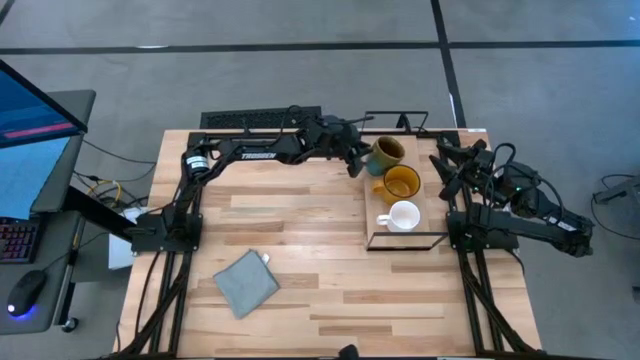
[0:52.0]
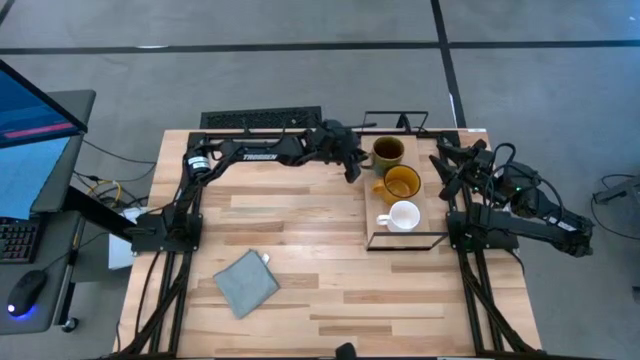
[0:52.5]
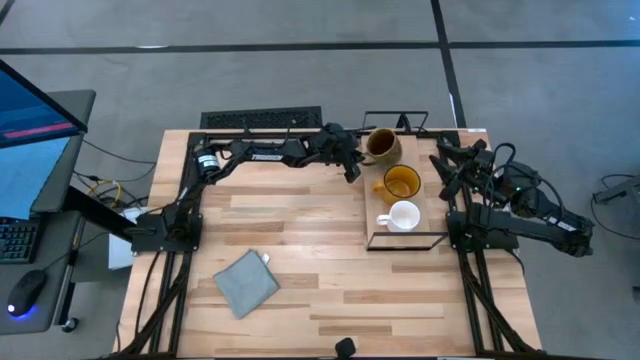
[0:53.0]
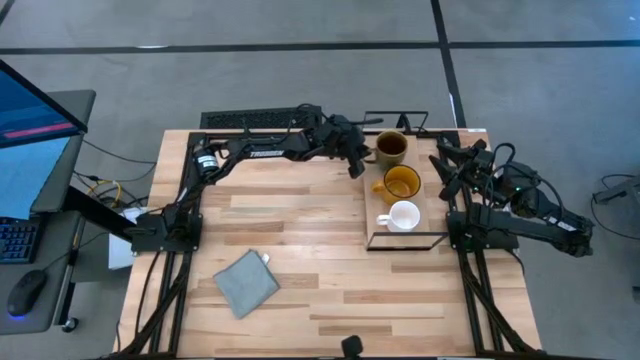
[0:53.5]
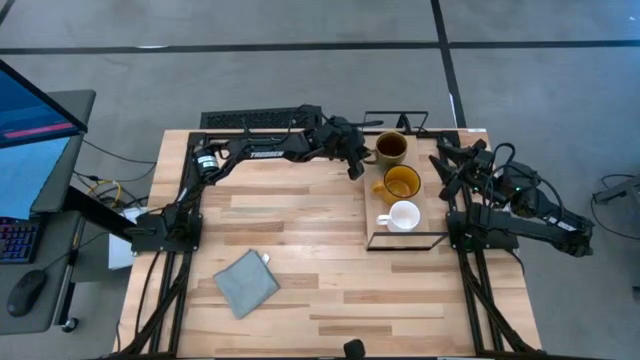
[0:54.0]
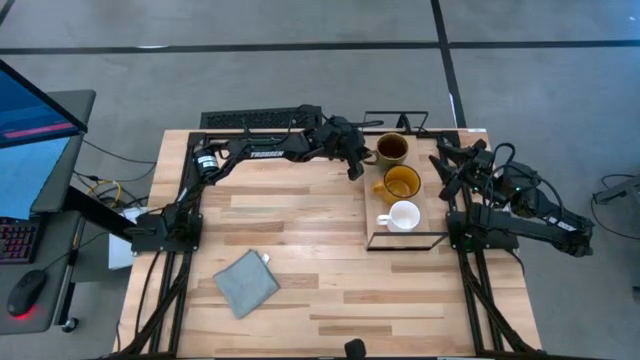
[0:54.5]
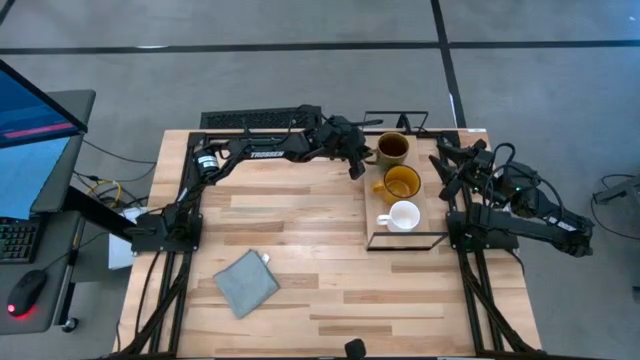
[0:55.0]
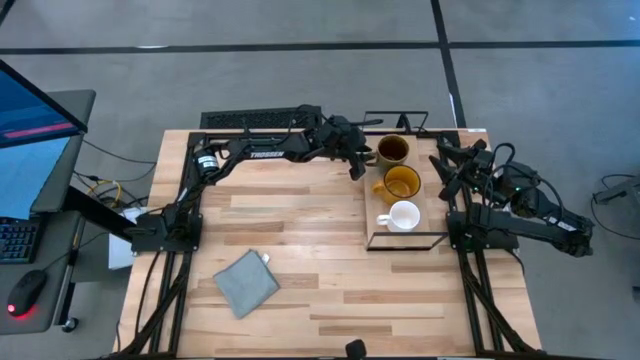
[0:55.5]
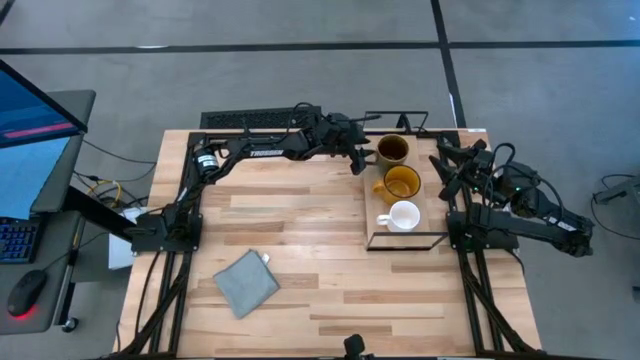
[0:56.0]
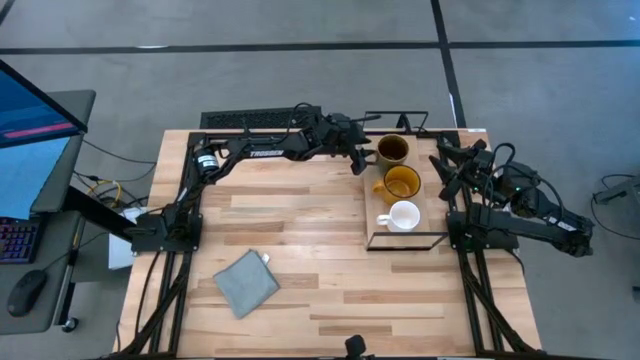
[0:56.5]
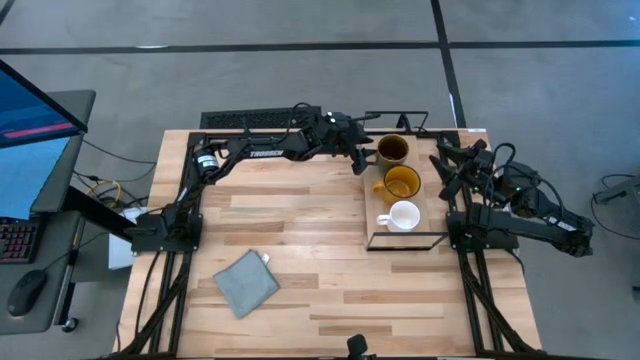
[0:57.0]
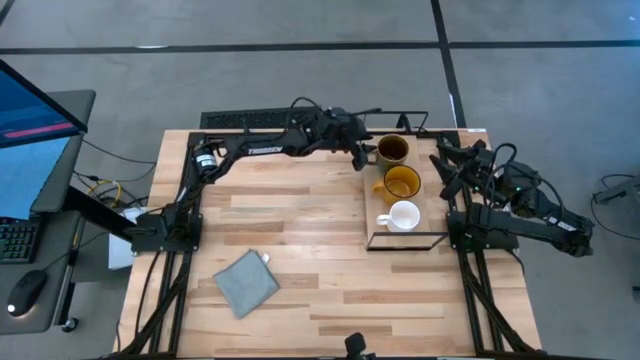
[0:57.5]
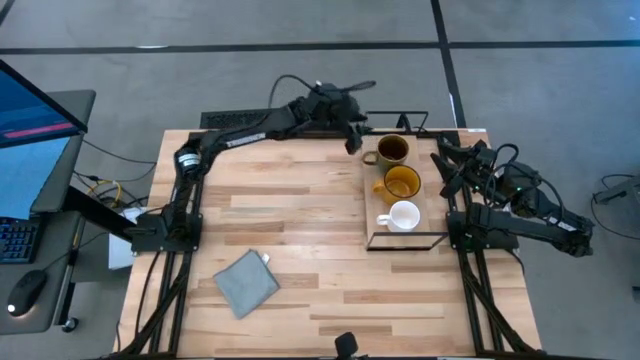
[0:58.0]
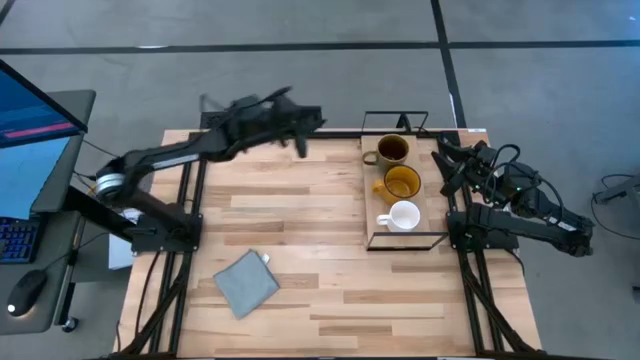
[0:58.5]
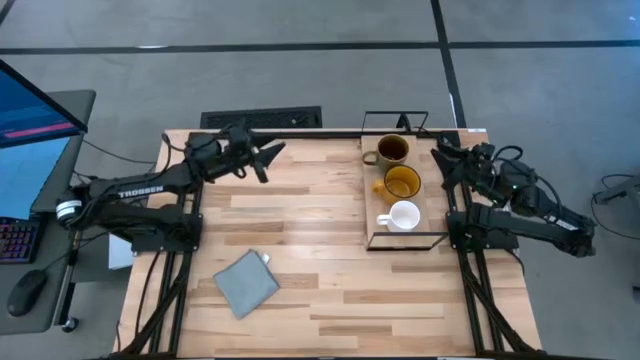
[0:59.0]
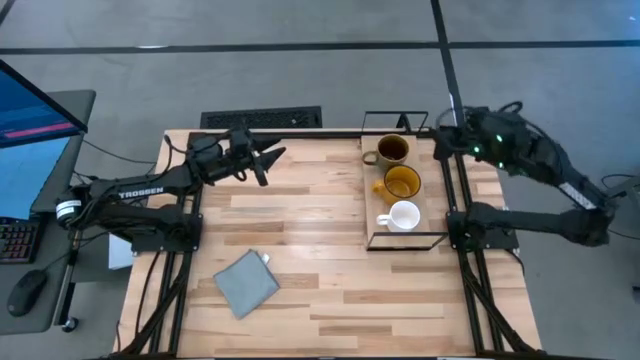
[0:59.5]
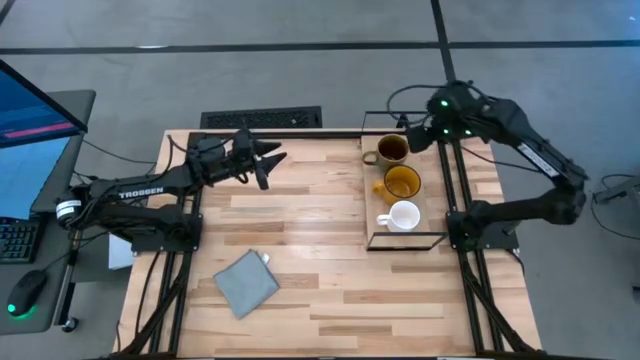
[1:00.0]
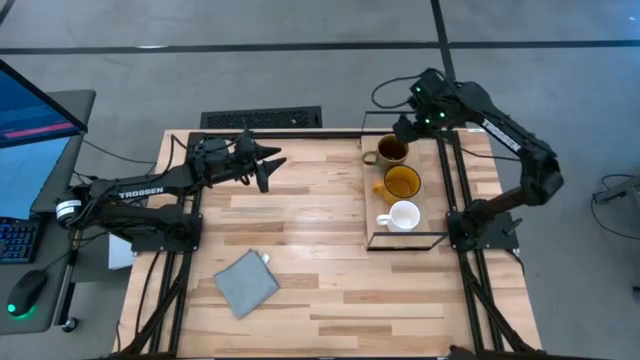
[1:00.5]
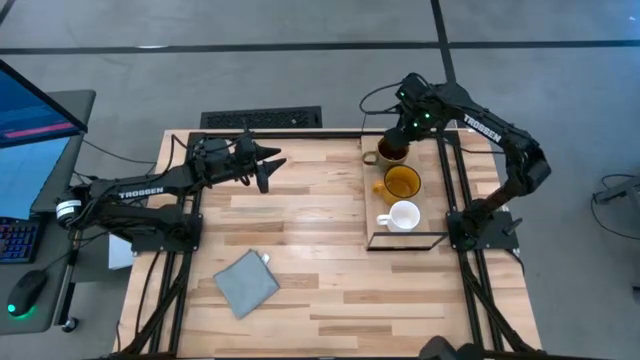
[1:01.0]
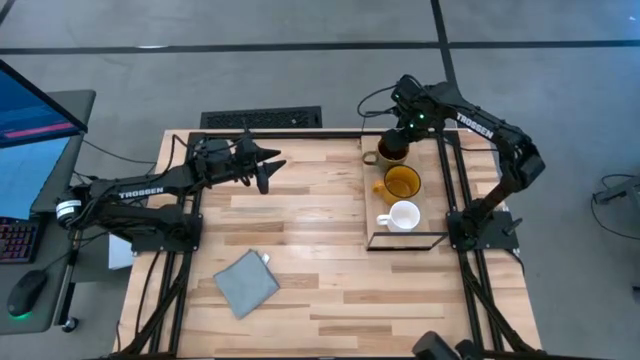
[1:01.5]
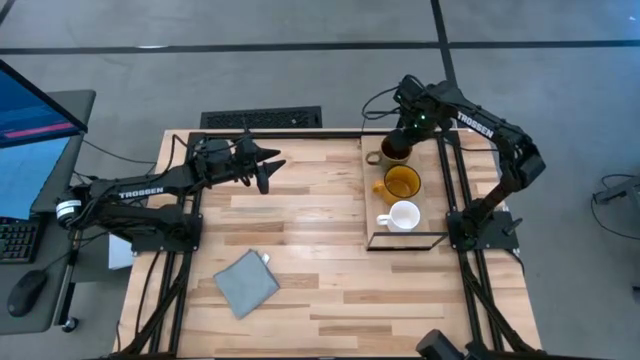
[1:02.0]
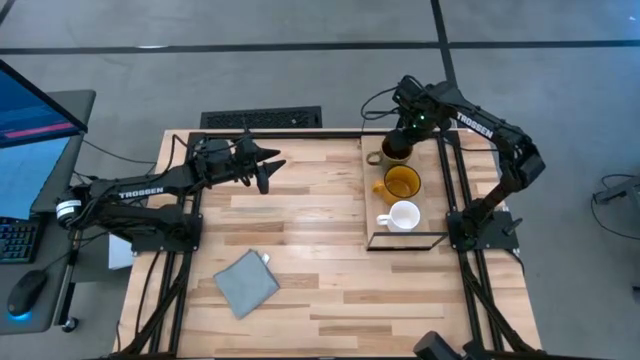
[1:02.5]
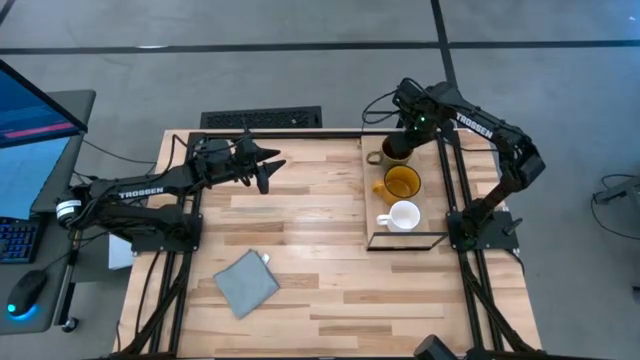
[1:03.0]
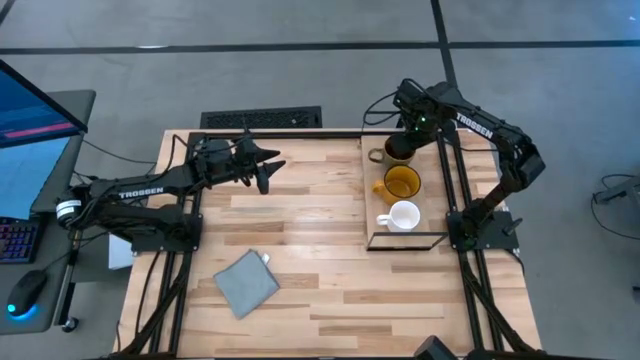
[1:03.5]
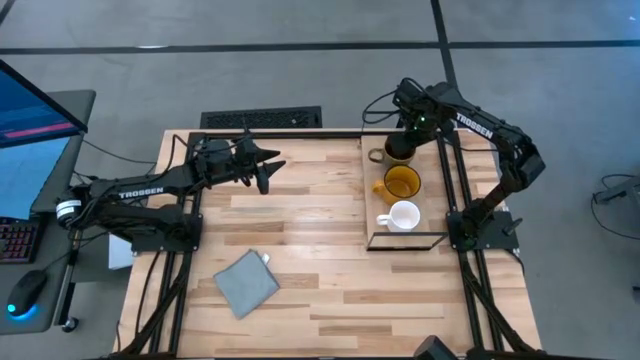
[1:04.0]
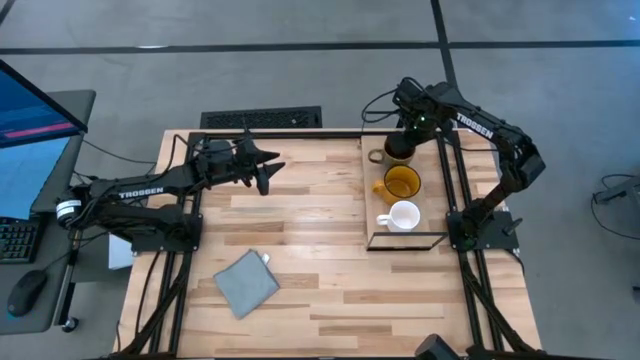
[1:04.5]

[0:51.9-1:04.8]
Task: Stack small to large cups/mugs on shelf
Put the green mug on the shelf
